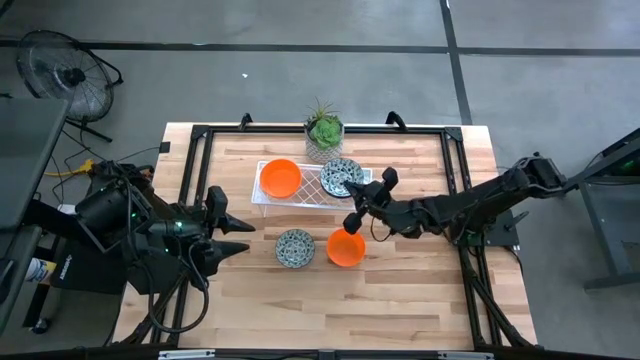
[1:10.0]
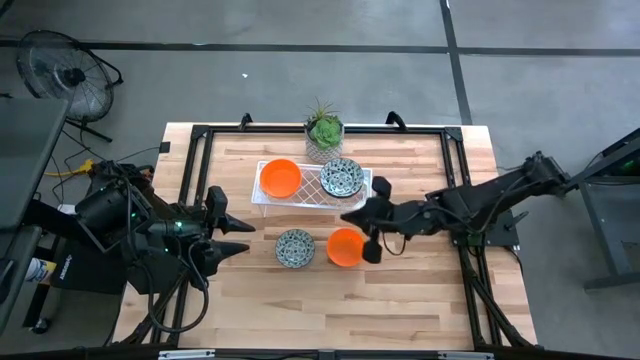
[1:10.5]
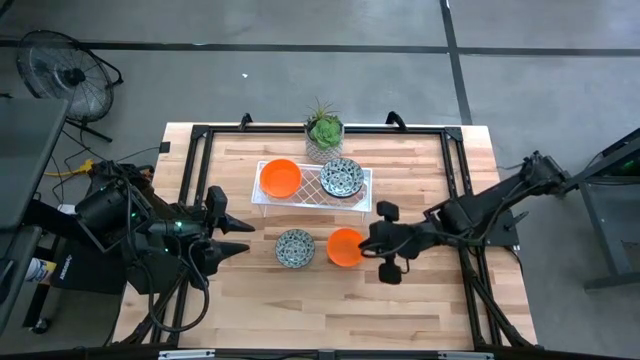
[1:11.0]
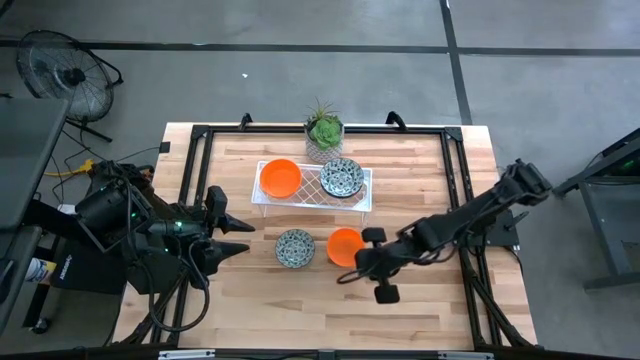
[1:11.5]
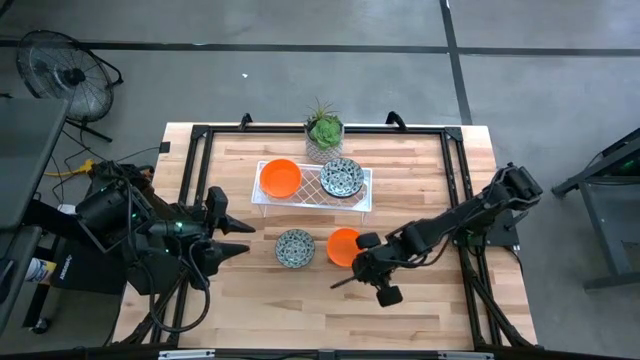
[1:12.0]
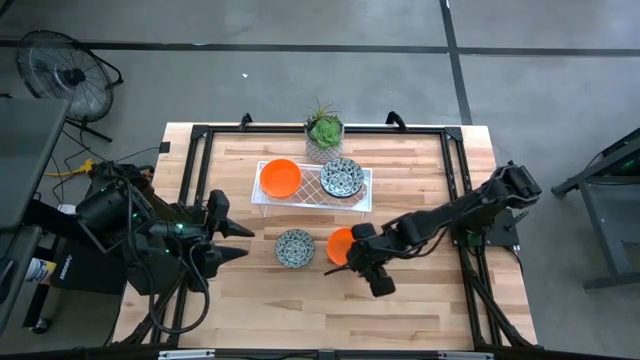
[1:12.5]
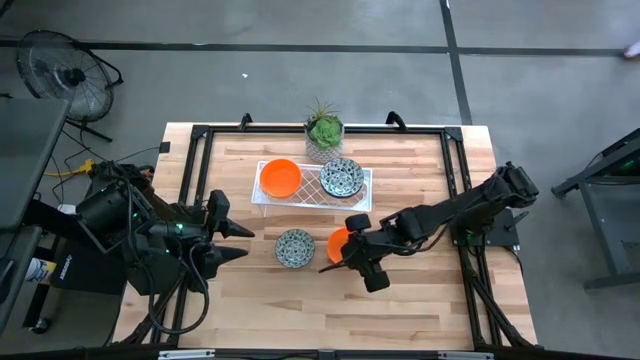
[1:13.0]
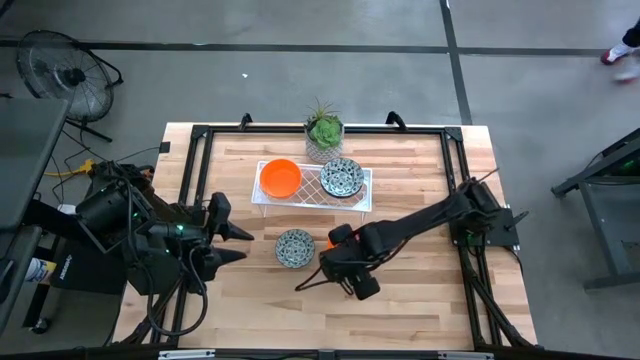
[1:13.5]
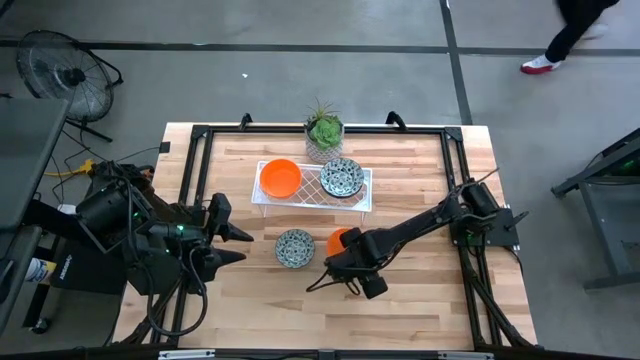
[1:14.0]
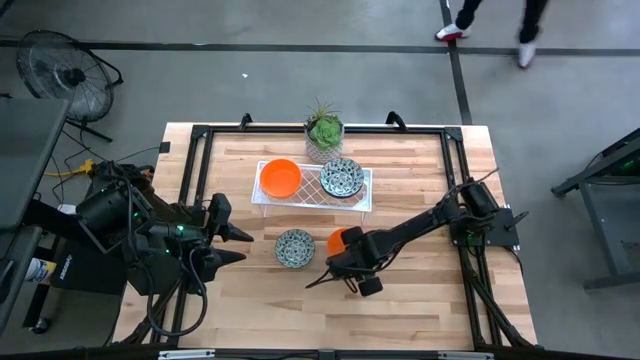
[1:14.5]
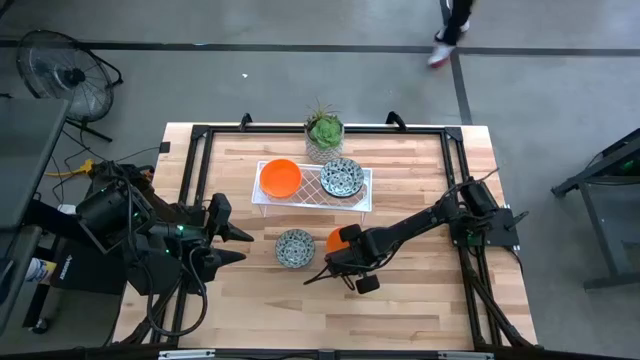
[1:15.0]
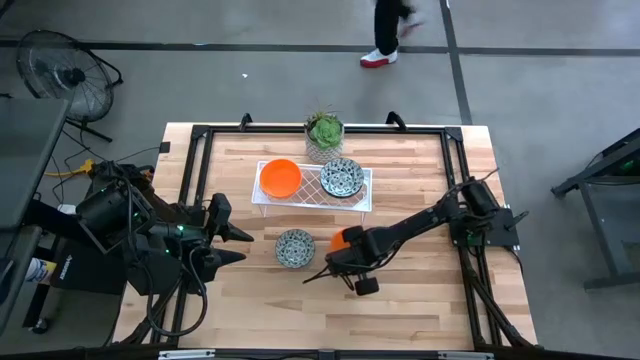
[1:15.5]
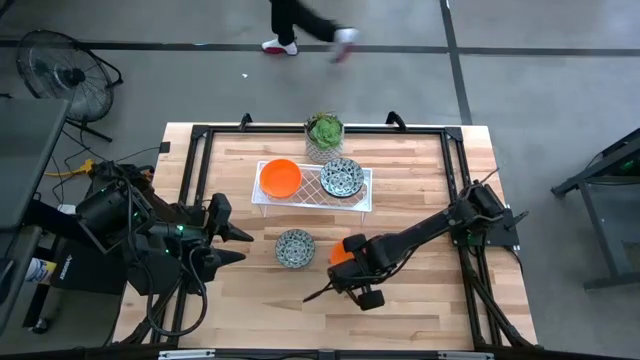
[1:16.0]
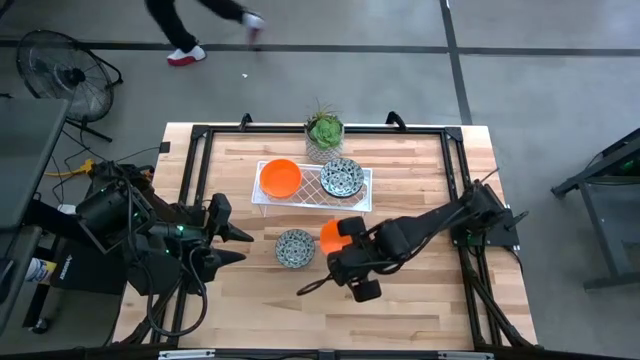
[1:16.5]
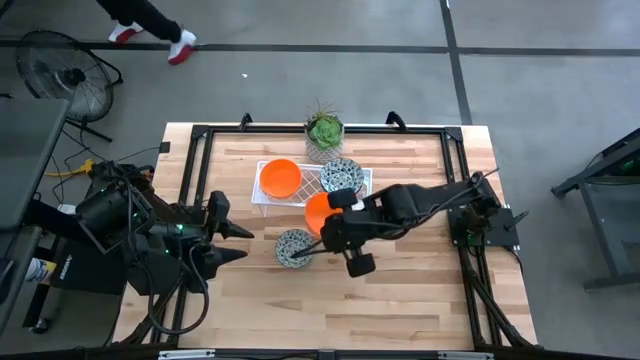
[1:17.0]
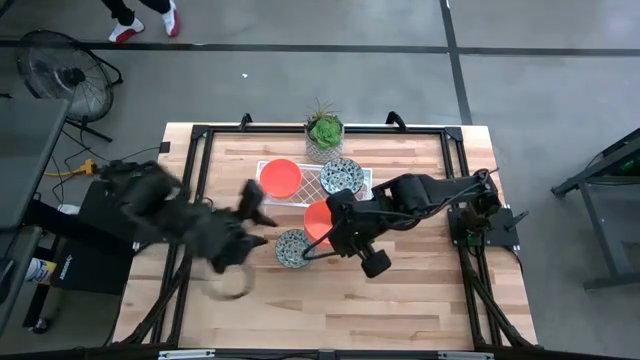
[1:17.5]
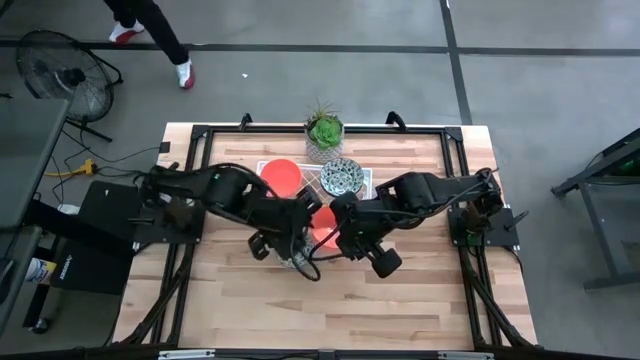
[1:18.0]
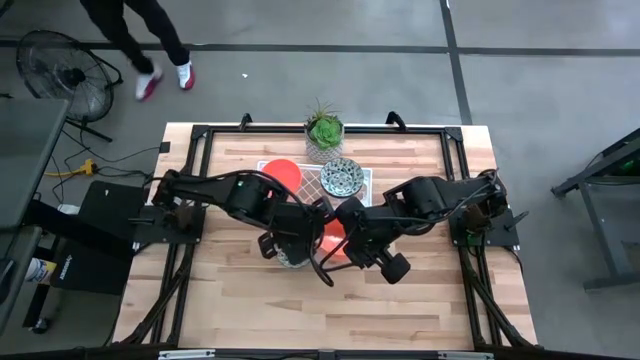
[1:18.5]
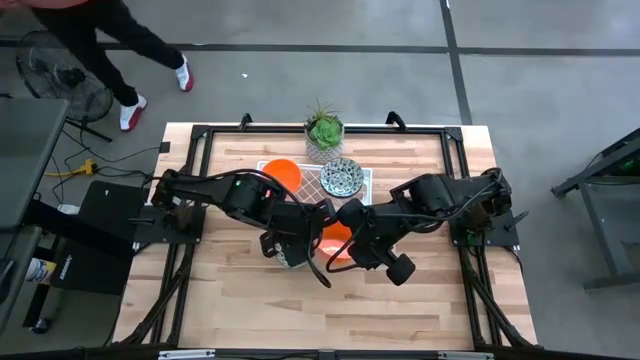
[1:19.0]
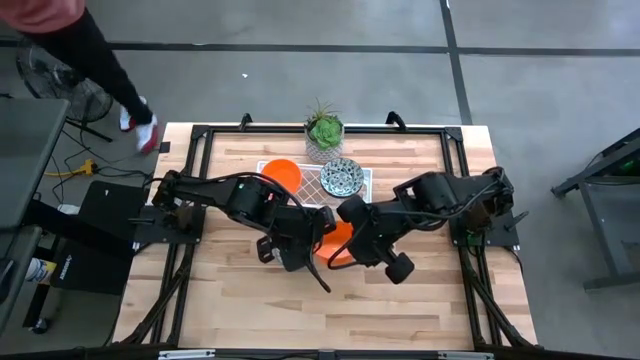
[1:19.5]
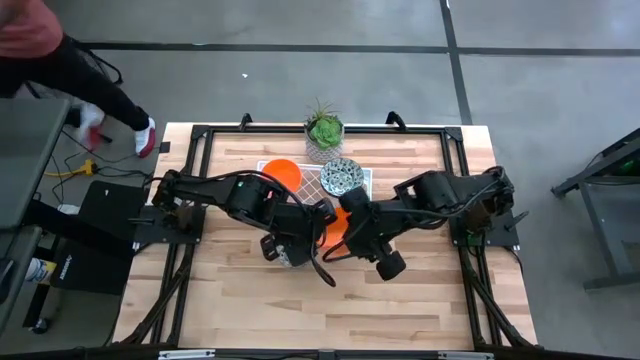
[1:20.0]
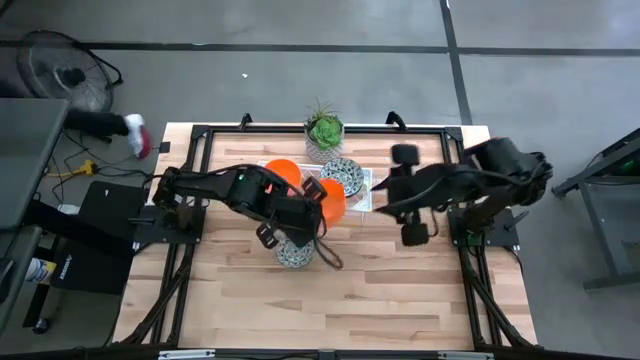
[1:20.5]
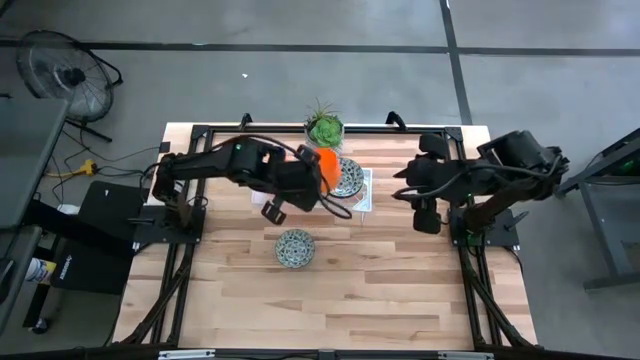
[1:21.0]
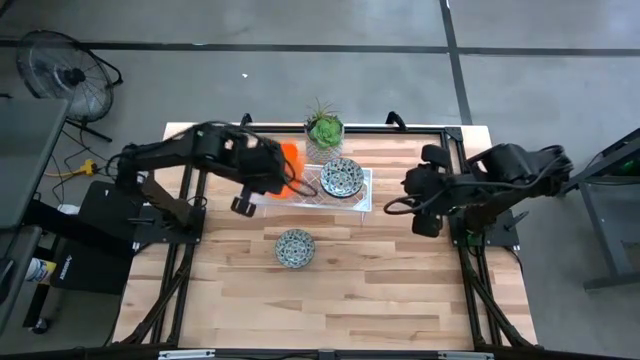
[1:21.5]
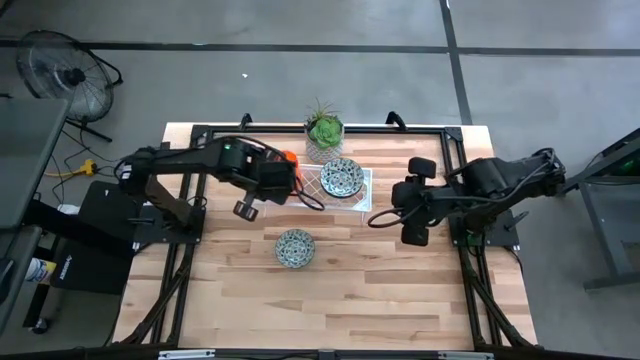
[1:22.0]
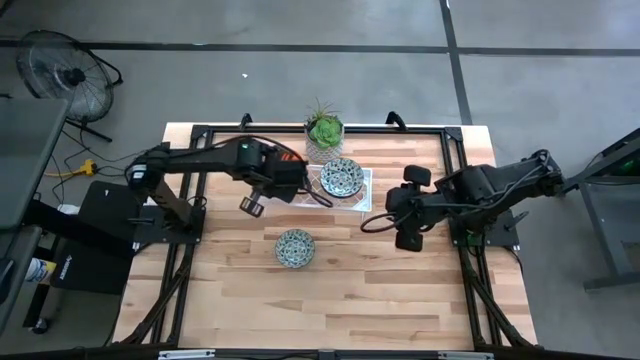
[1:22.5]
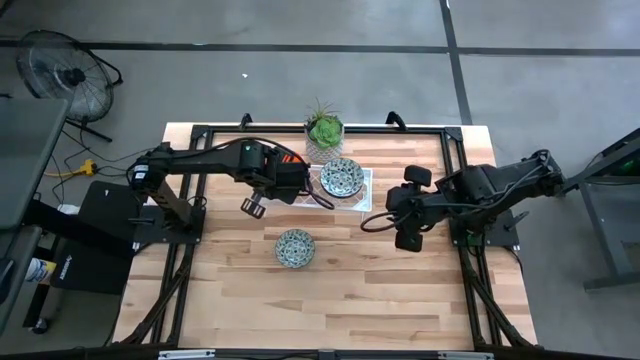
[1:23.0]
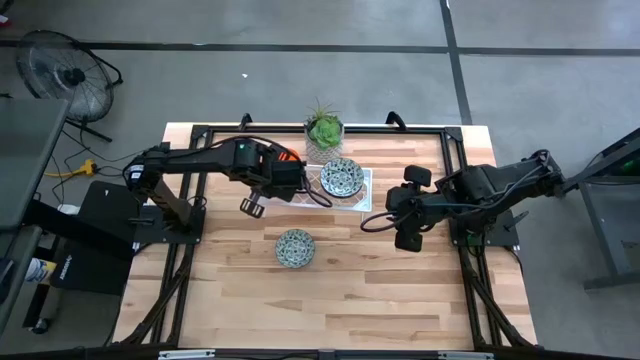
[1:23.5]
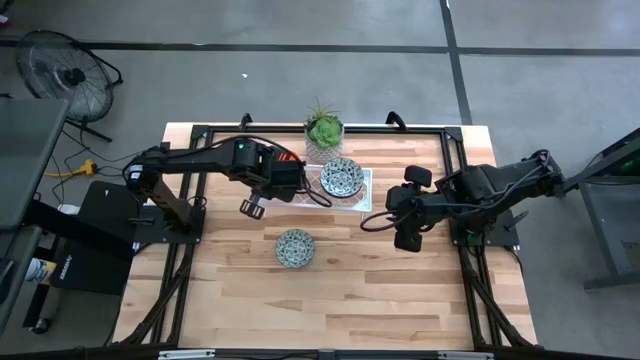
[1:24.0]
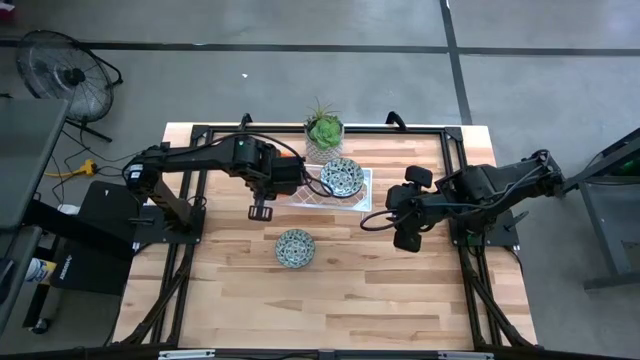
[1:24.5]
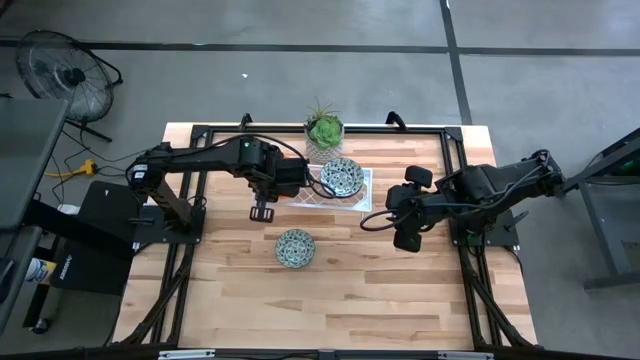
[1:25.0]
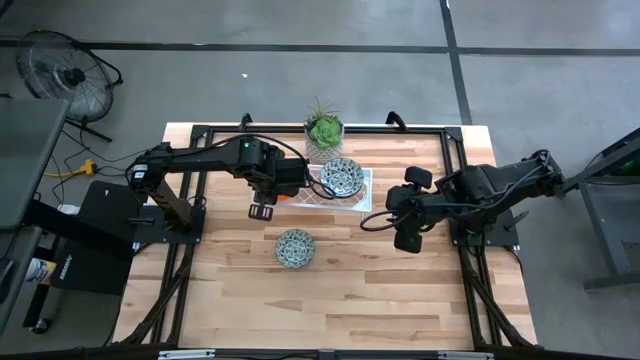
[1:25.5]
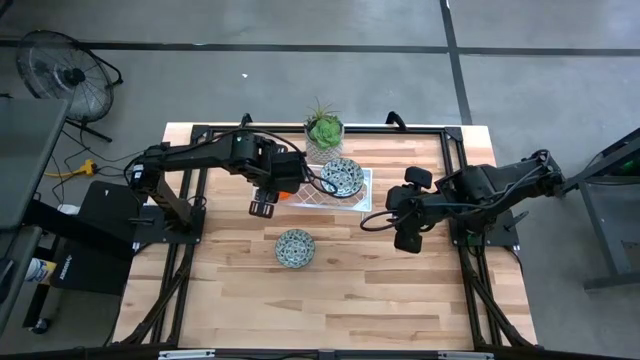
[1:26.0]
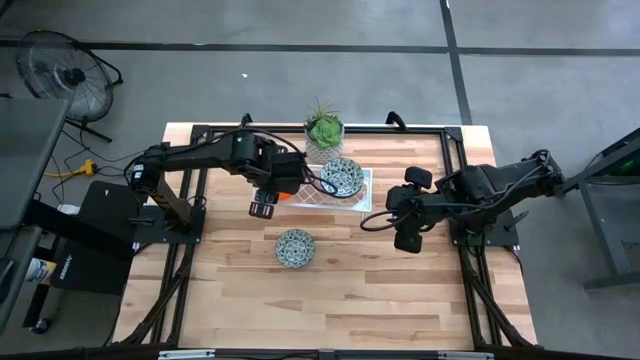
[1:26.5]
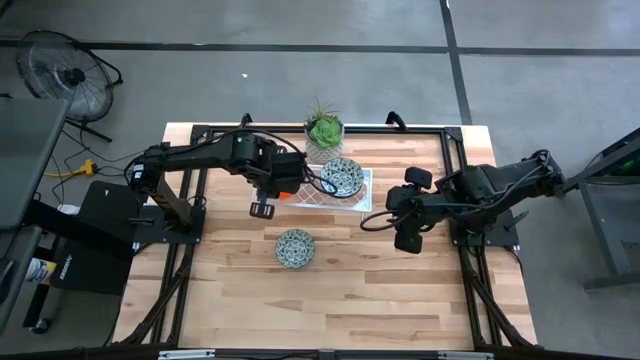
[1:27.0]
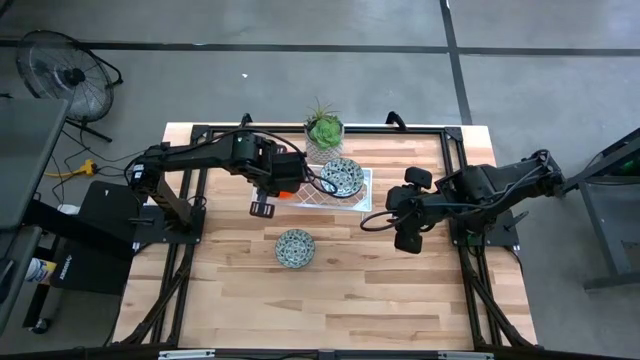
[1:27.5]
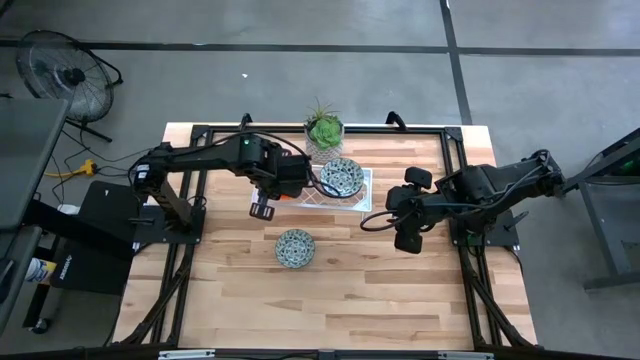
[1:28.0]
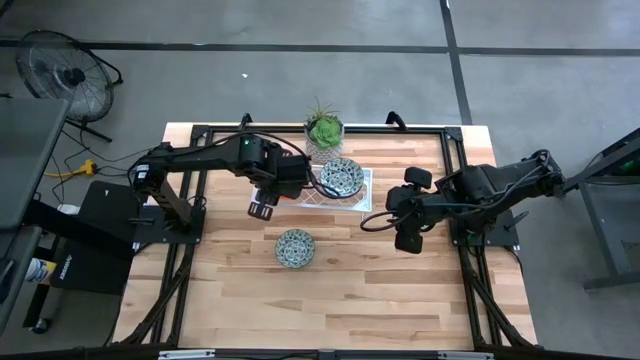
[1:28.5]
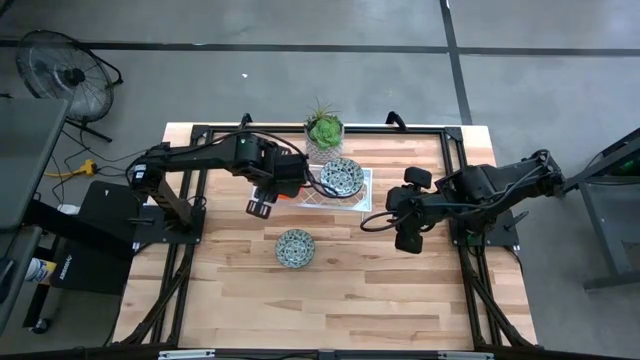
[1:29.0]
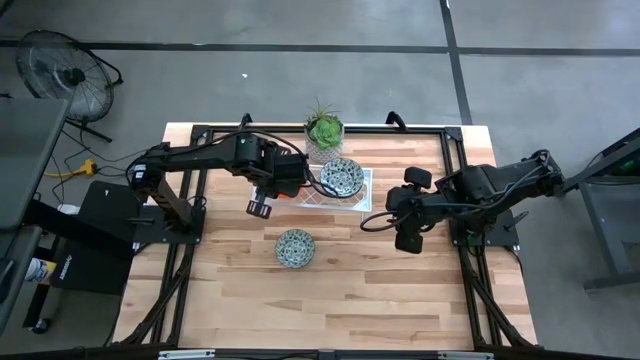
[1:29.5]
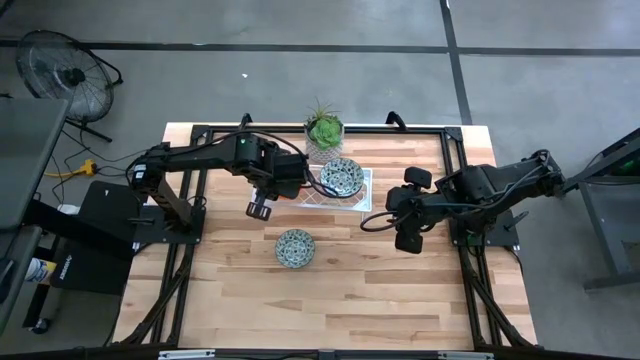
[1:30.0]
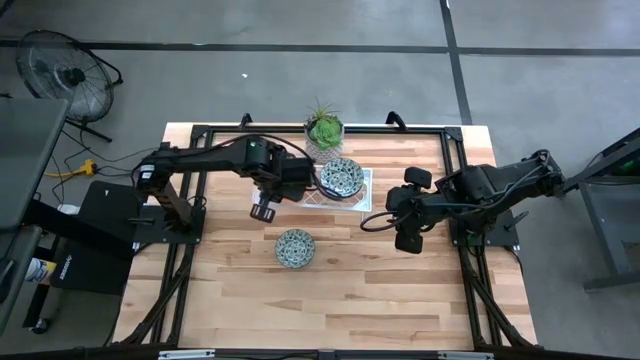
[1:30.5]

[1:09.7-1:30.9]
Task: Pick & Place Mini bowls
Stack the orange bowl on the orange bowl on the shelf
